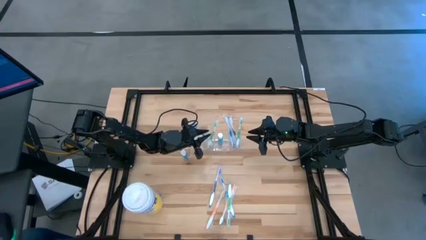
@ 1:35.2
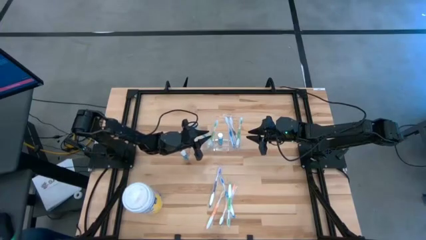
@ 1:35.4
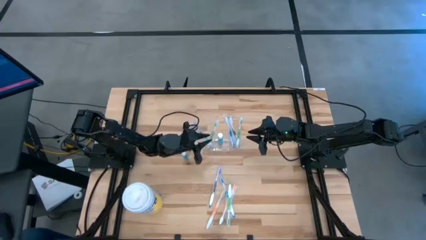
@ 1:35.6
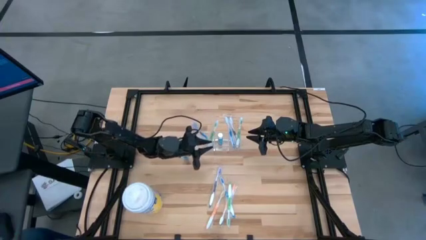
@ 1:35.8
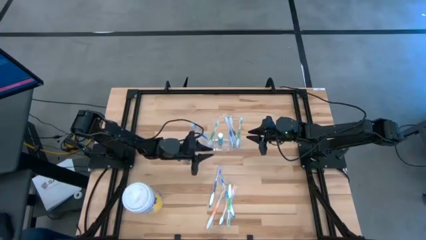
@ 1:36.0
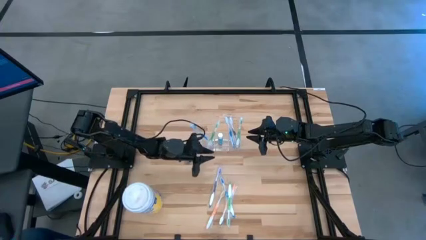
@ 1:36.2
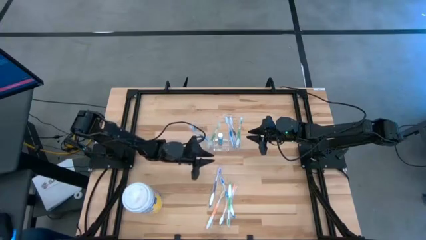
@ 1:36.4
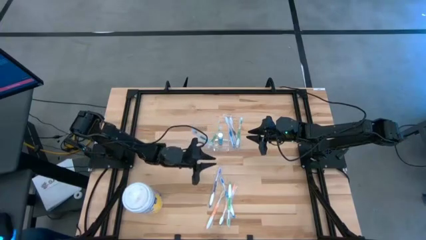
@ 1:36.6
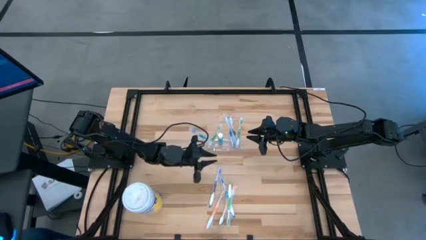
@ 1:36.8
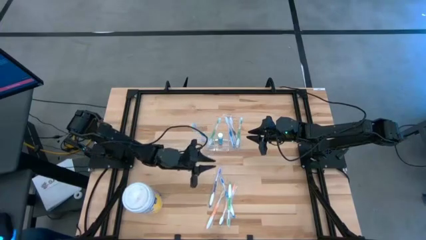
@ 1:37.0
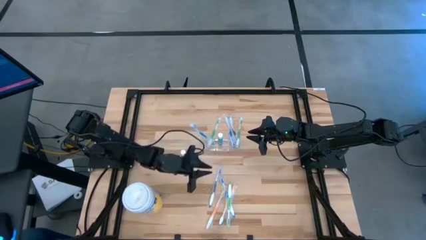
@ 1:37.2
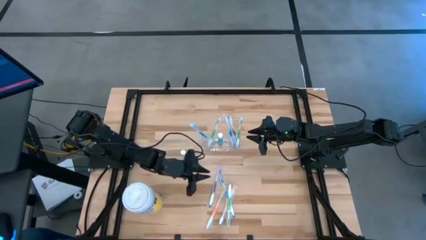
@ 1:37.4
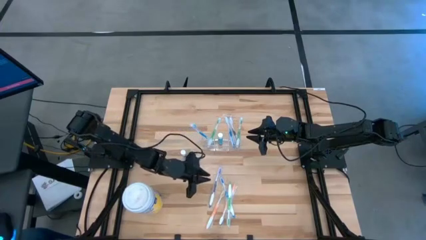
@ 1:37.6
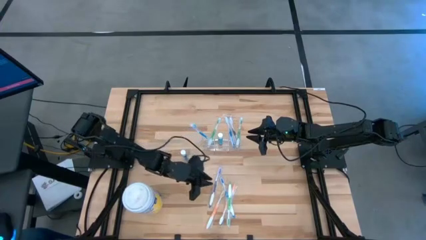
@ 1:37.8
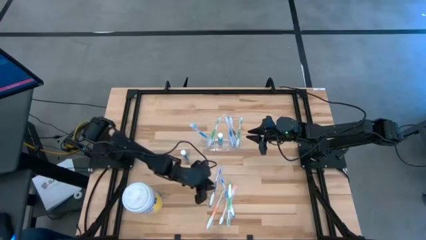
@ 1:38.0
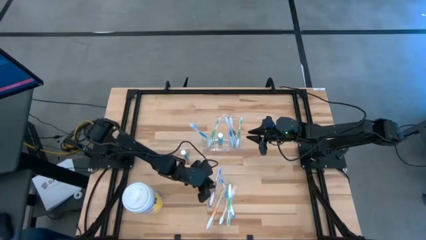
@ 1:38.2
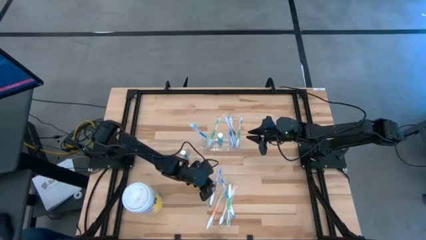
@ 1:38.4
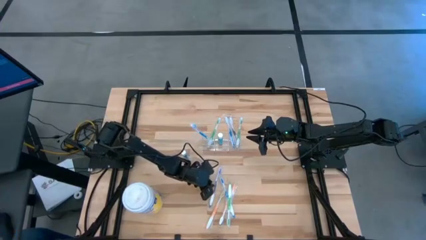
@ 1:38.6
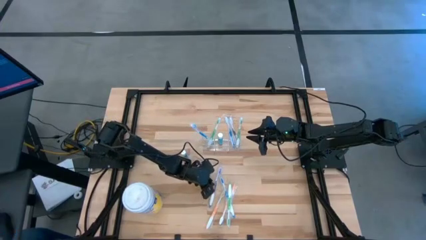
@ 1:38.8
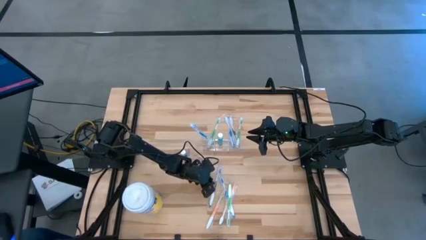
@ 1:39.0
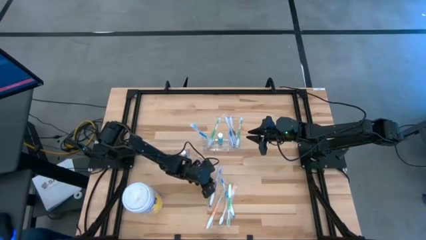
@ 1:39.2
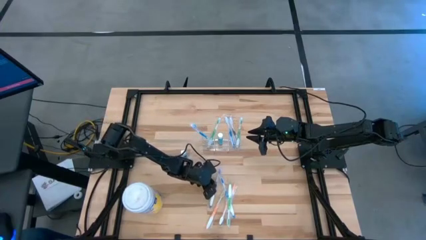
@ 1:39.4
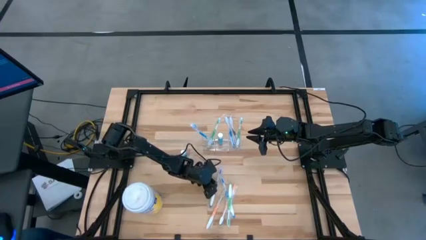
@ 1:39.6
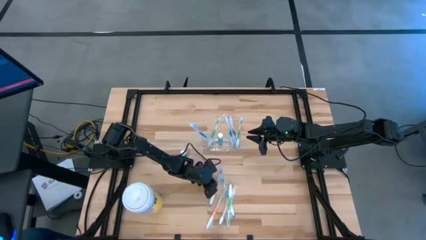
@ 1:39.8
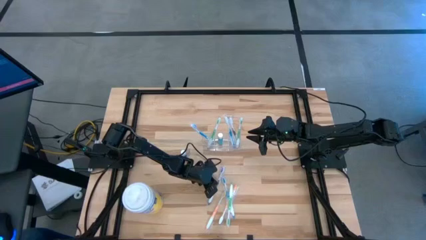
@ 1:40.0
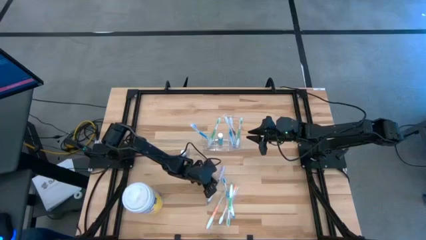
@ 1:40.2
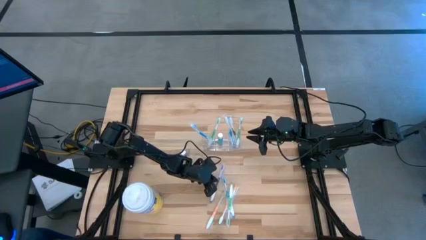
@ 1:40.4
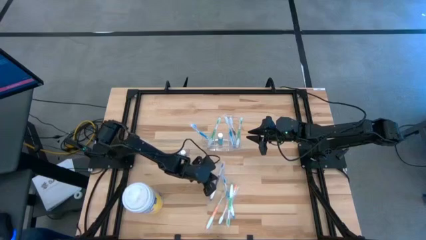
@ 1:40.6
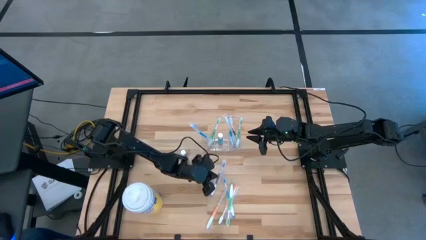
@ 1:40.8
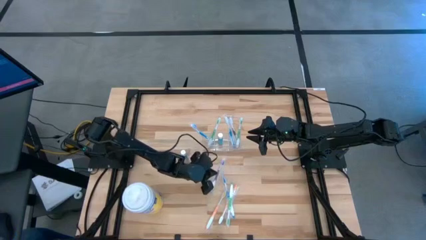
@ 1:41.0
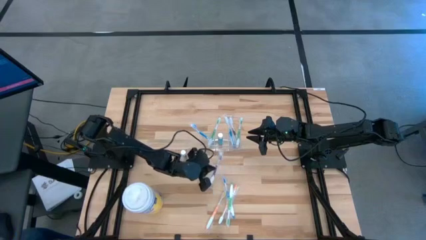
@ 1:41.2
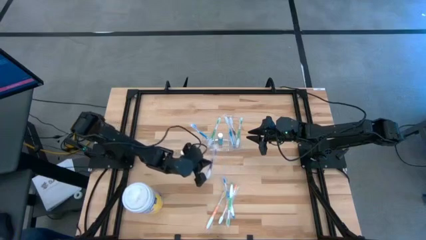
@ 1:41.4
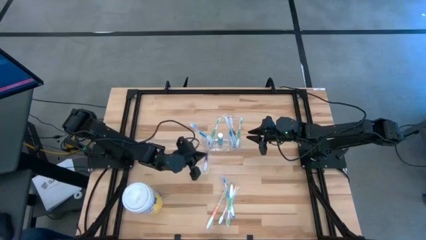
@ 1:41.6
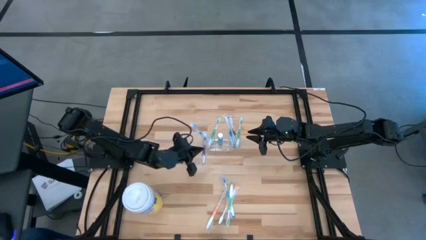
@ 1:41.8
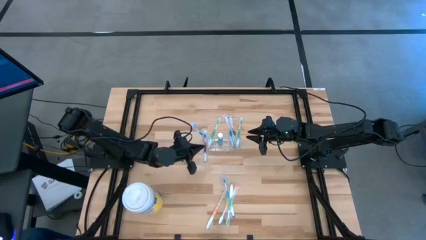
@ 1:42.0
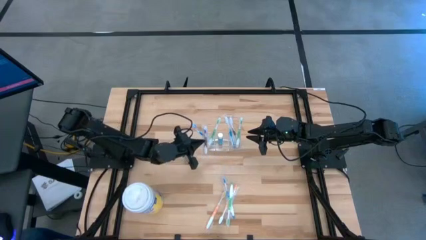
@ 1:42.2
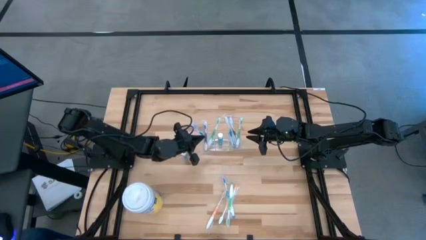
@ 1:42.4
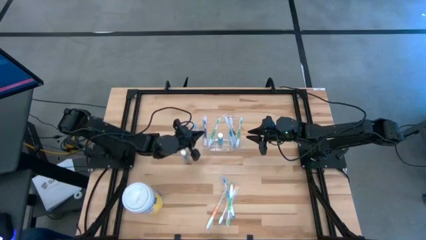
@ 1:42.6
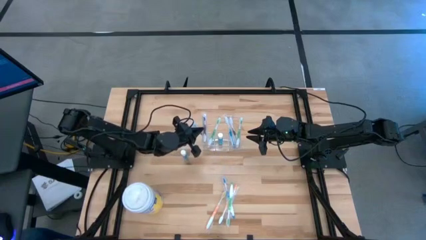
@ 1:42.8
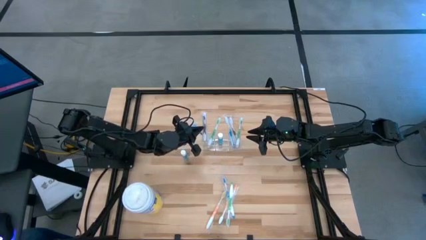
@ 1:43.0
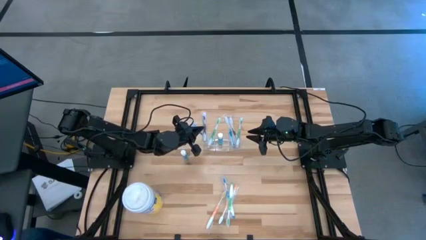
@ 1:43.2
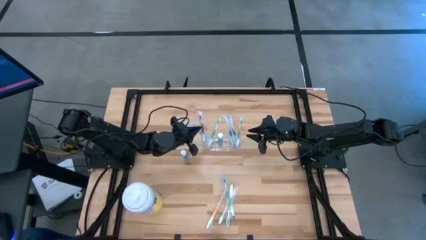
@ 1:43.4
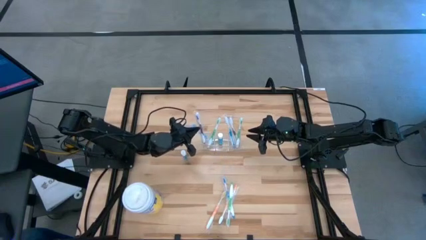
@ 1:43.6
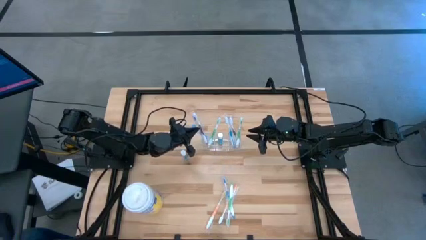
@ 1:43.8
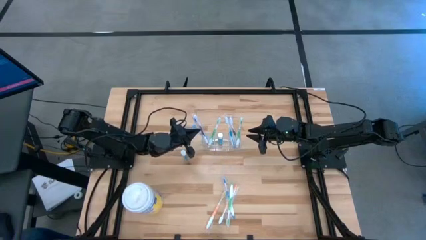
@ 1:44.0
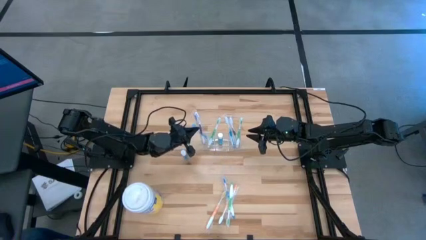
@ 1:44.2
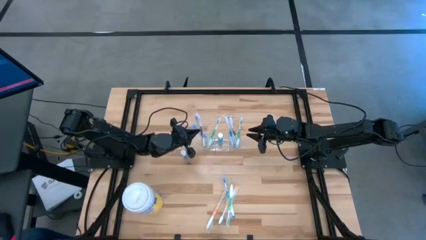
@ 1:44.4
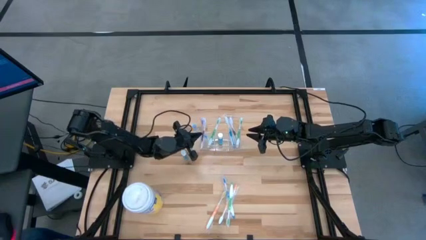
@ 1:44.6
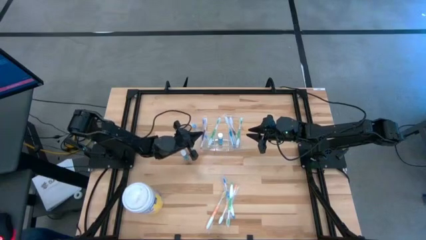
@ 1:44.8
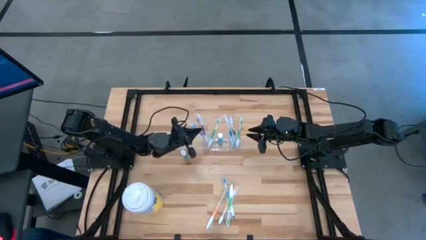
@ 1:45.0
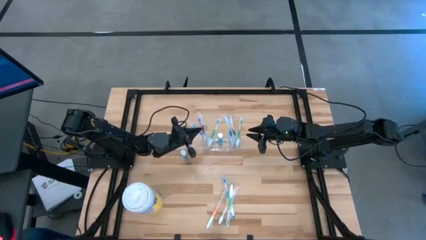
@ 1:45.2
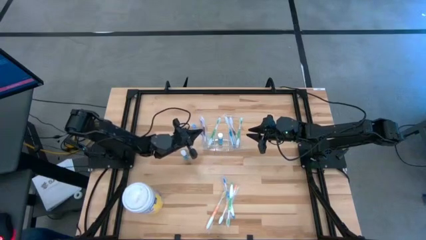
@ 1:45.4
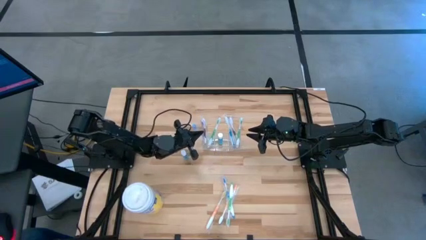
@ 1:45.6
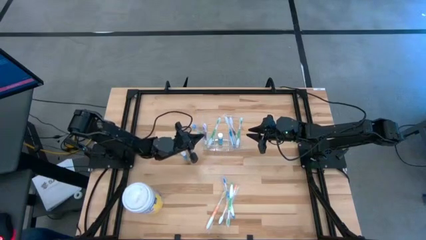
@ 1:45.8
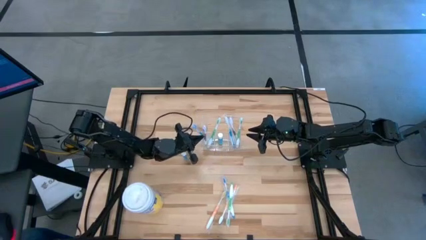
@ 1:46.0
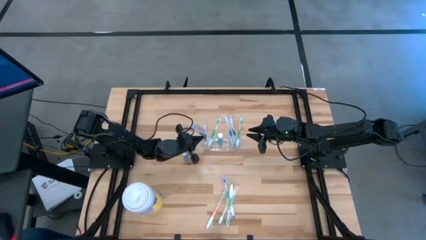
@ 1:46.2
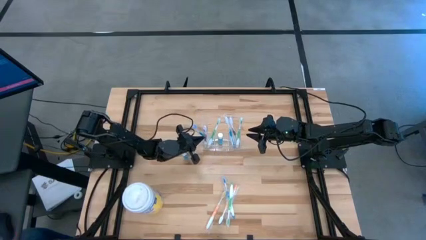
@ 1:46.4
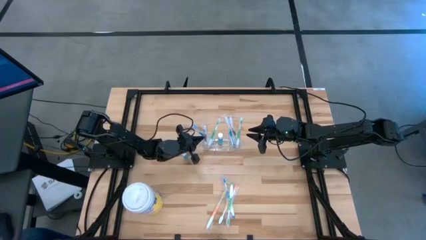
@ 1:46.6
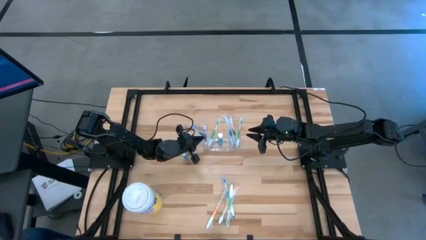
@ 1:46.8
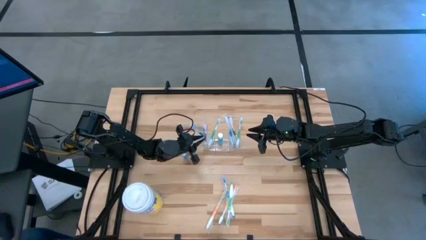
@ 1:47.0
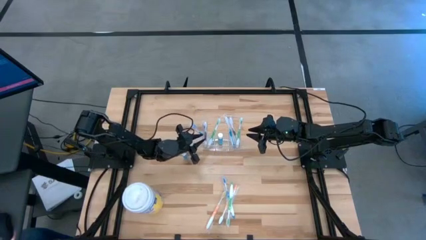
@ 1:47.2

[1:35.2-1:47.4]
Task: Pick & Place toothbrushing station
Put the violet toothbrush into the transparent organizer

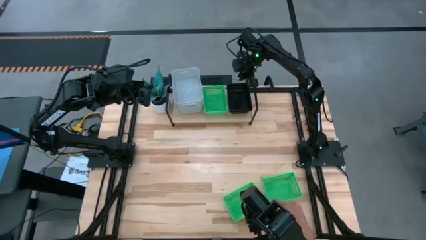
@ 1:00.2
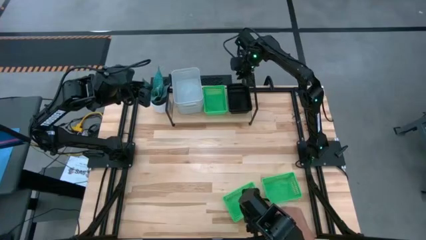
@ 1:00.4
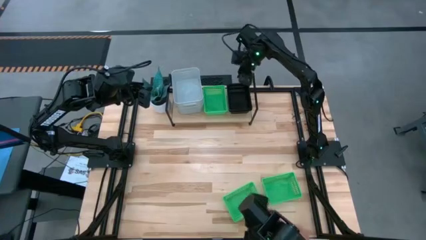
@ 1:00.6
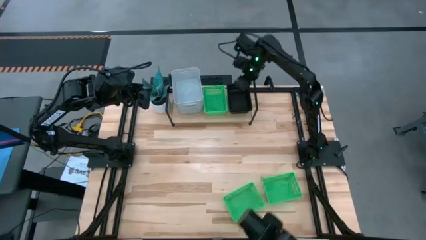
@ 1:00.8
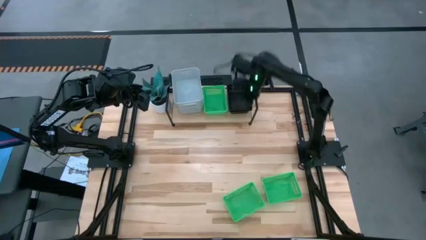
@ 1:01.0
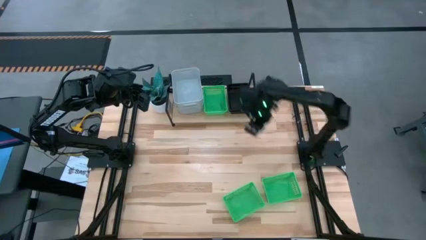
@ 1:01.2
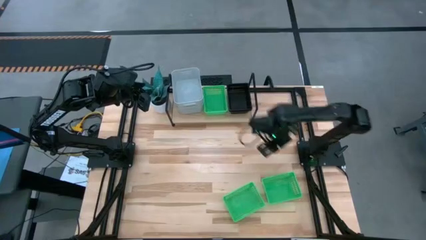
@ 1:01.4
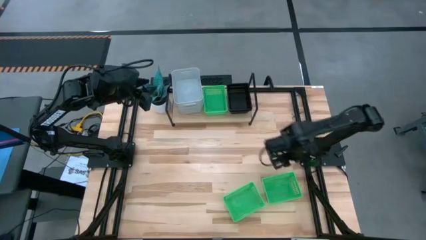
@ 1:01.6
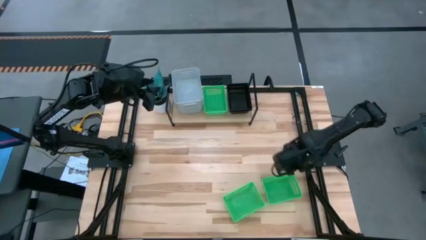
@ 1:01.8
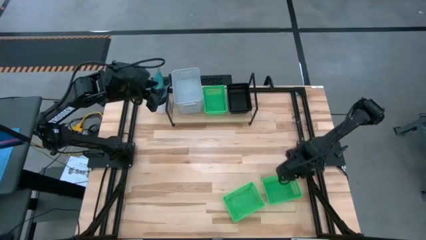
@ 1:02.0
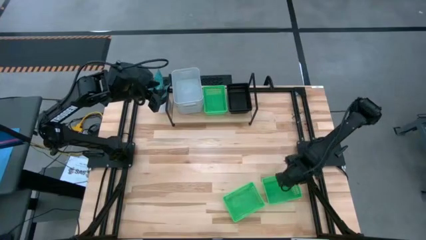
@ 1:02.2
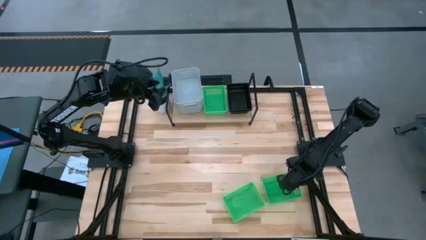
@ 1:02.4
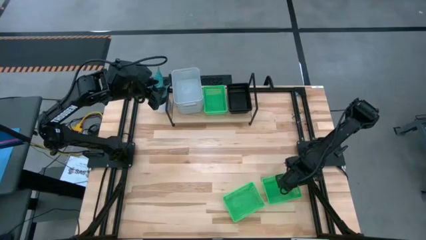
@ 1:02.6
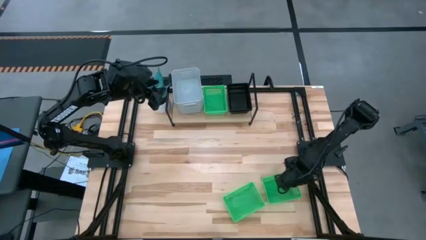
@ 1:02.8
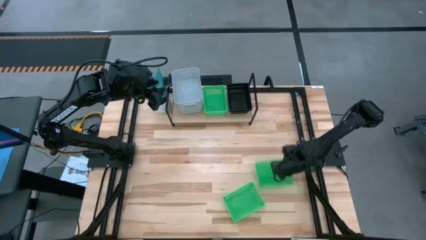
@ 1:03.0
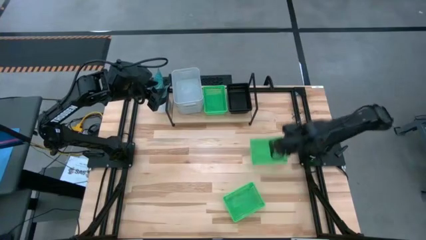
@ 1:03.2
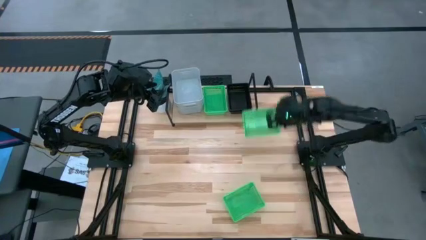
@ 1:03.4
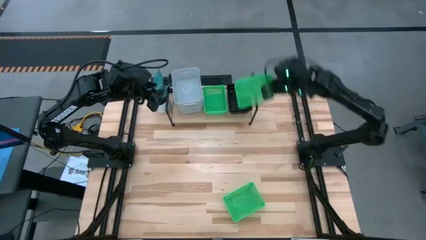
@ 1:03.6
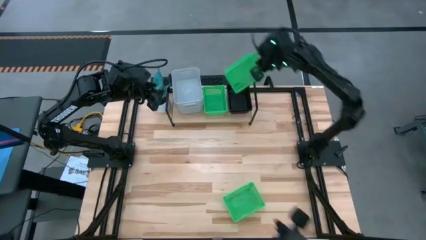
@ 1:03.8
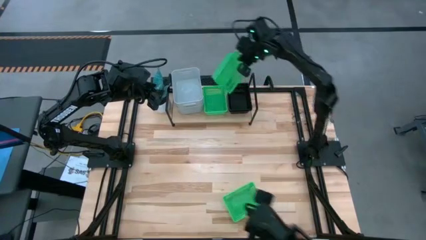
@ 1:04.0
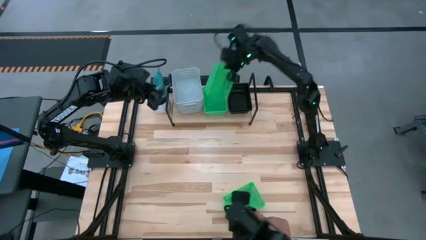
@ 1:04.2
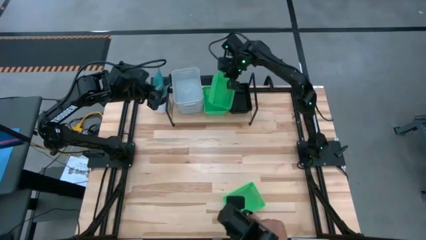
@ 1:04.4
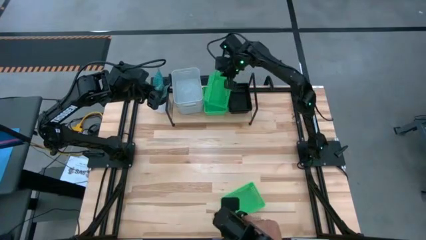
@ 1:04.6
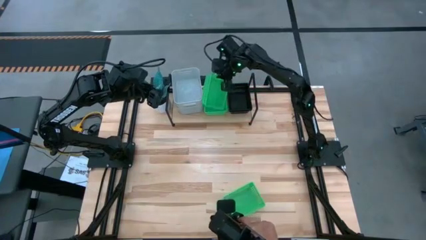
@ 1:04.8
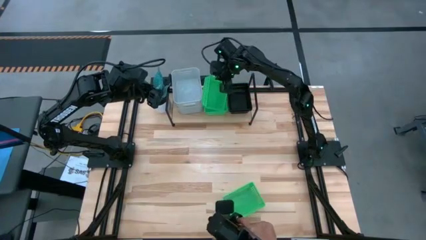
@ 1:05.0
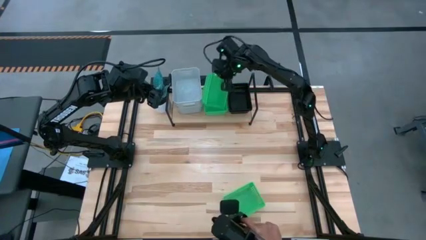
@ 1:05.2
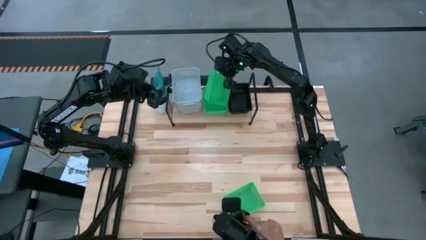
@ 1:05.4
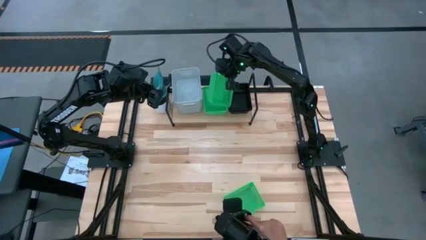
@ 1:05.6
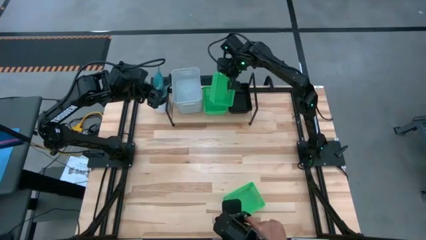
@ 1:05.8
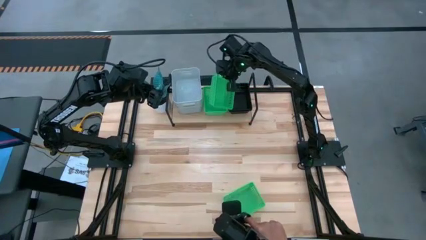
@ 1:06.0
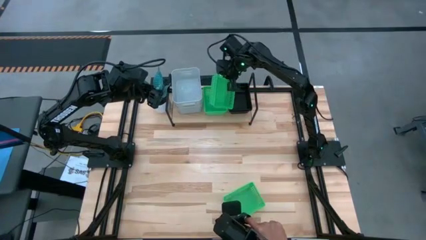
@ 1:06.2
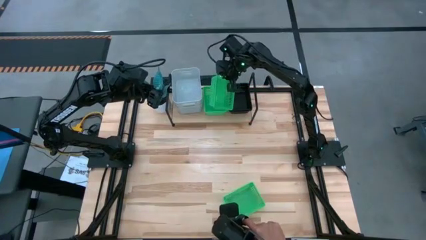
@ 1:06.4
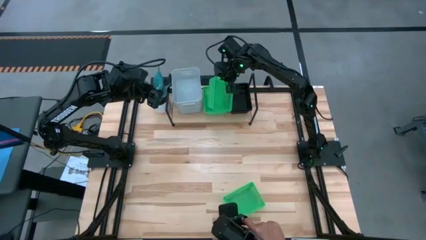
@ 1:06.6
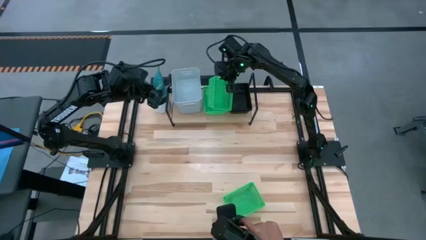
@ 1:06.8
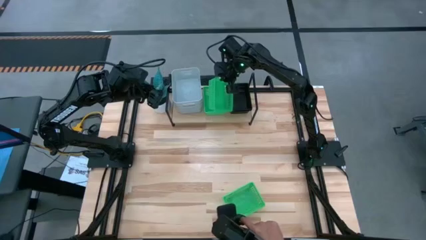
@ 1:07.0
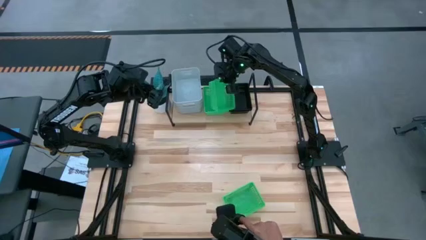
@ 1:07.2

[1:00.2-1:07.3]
Task: Stack baskets on shelf by color
Stack the right green bin on the green bin on the shelf
